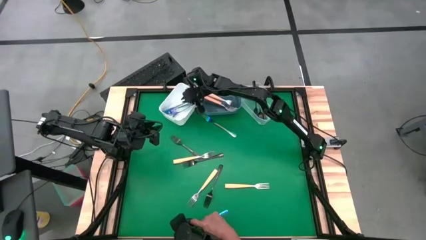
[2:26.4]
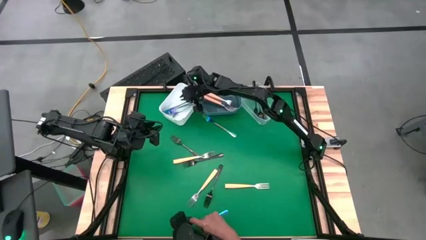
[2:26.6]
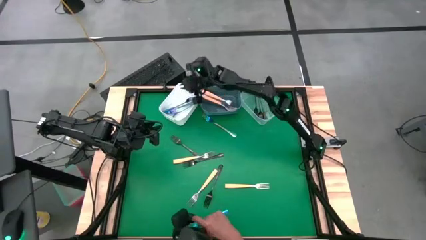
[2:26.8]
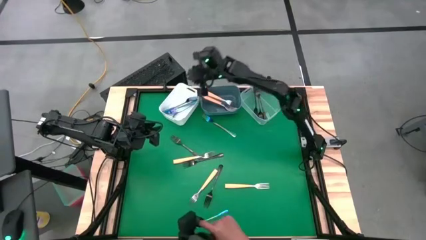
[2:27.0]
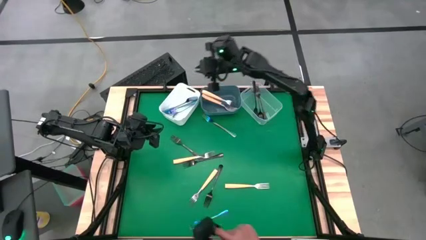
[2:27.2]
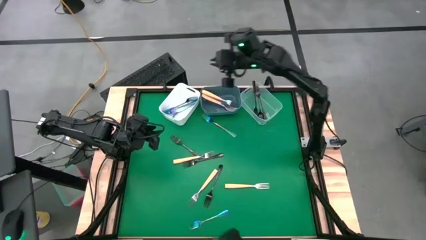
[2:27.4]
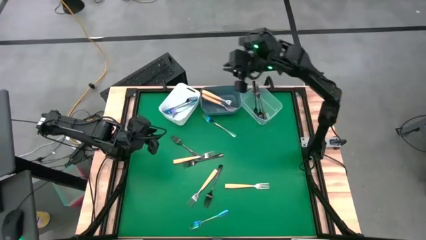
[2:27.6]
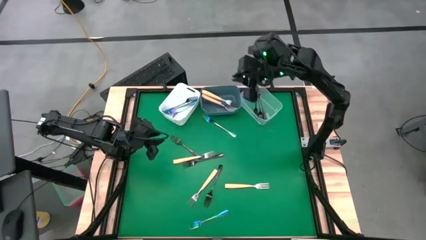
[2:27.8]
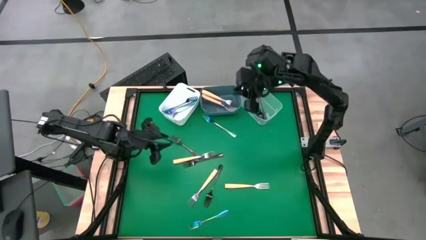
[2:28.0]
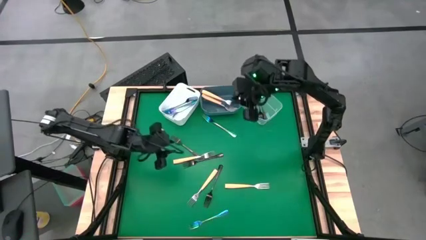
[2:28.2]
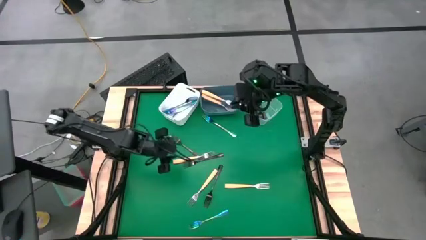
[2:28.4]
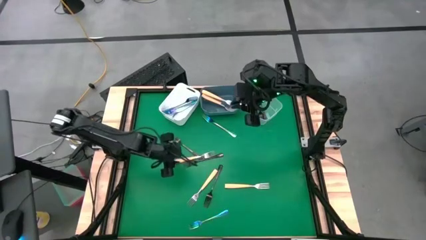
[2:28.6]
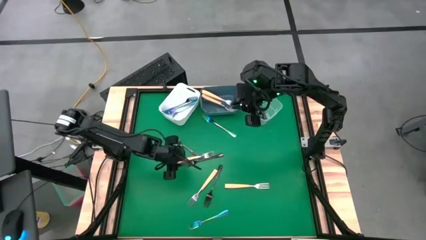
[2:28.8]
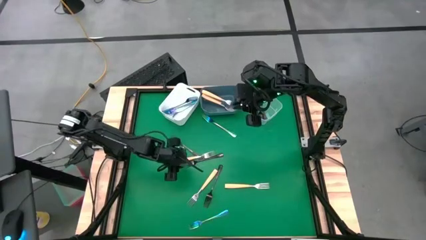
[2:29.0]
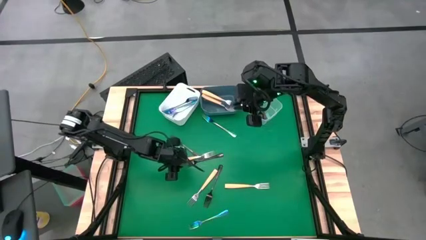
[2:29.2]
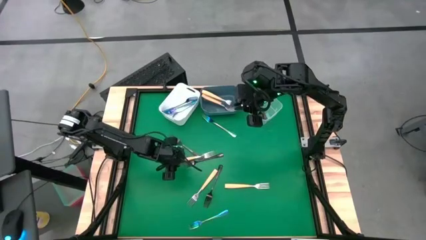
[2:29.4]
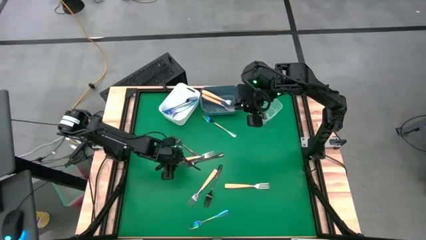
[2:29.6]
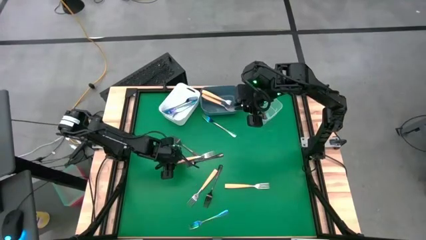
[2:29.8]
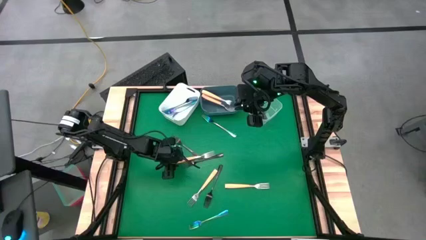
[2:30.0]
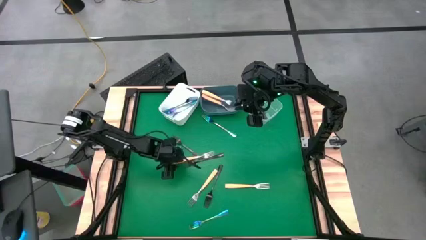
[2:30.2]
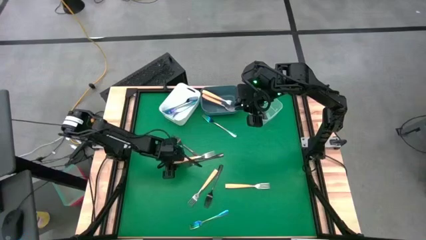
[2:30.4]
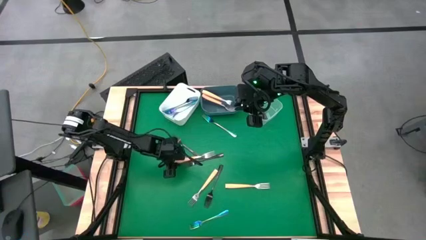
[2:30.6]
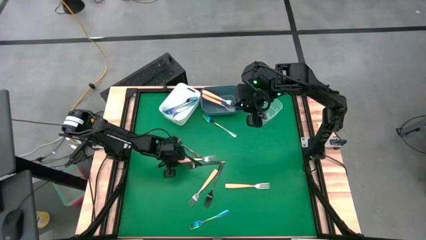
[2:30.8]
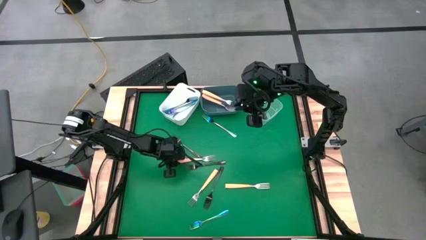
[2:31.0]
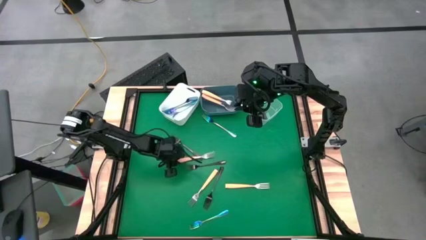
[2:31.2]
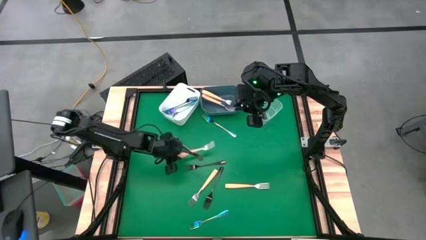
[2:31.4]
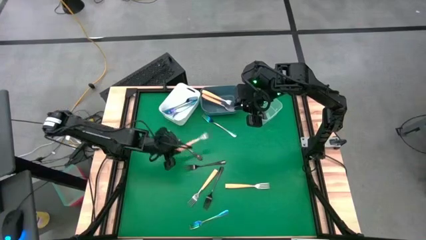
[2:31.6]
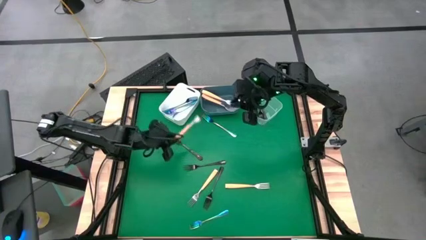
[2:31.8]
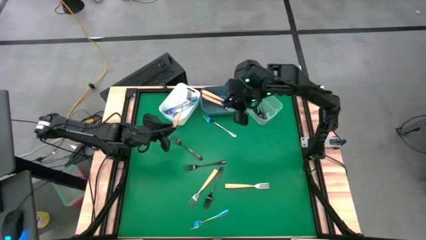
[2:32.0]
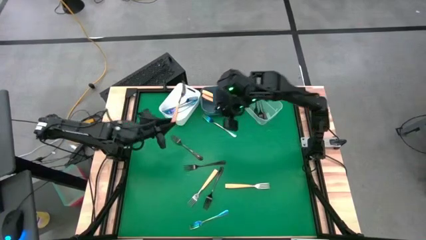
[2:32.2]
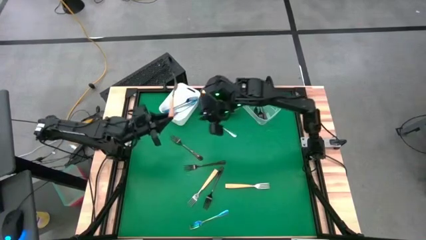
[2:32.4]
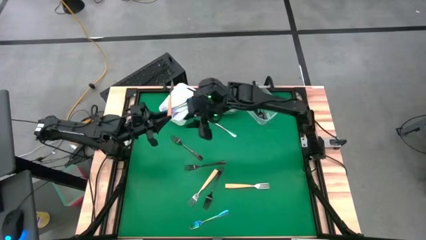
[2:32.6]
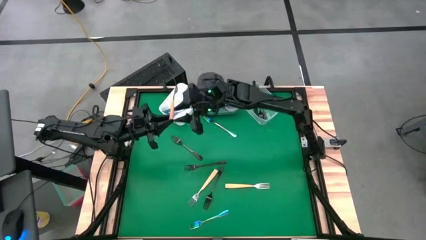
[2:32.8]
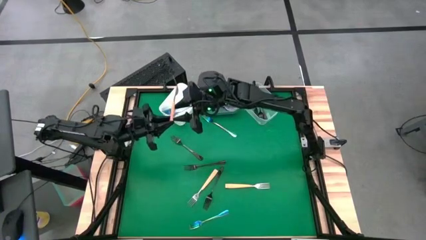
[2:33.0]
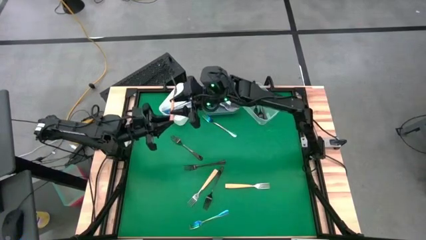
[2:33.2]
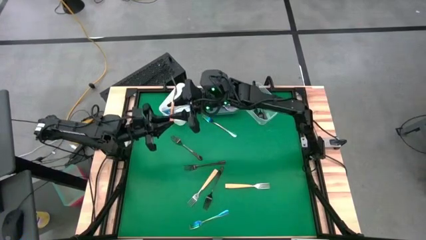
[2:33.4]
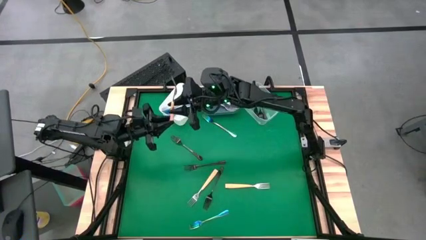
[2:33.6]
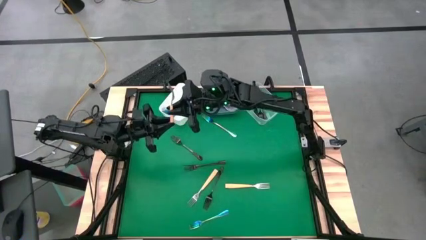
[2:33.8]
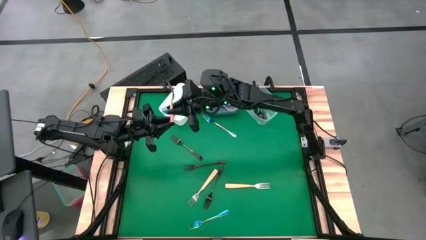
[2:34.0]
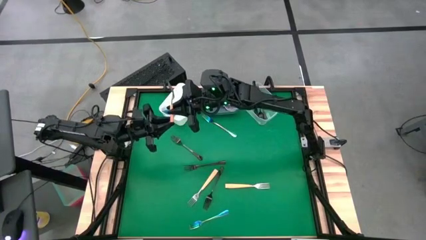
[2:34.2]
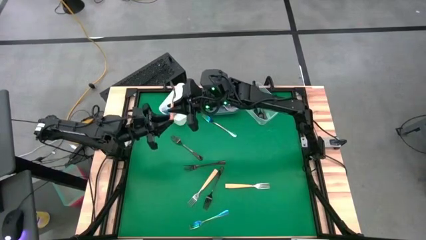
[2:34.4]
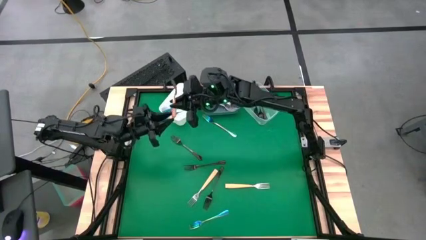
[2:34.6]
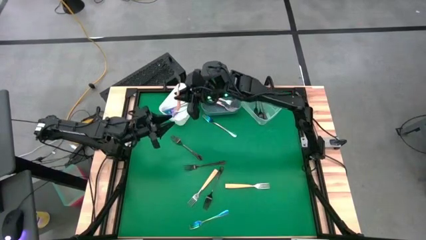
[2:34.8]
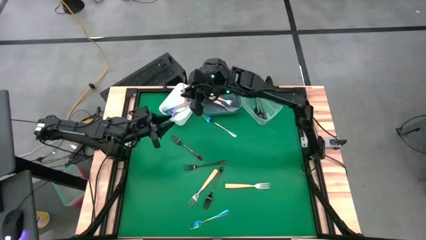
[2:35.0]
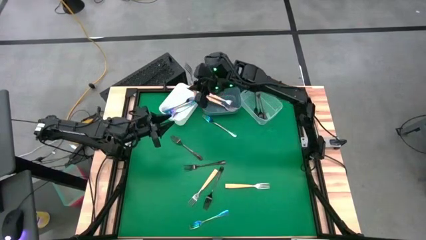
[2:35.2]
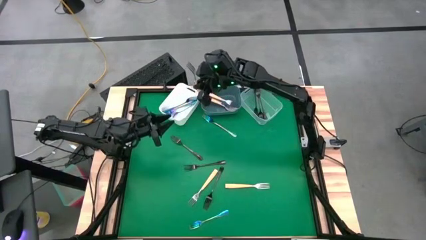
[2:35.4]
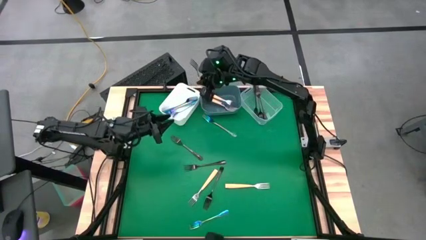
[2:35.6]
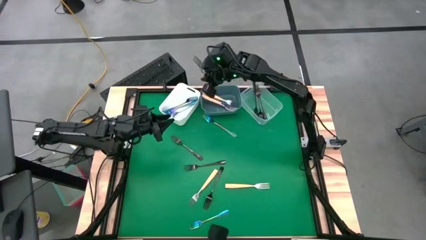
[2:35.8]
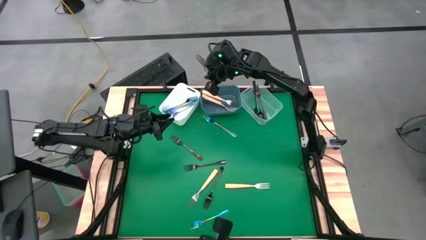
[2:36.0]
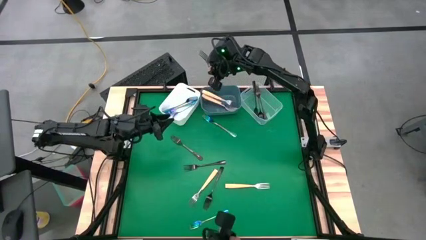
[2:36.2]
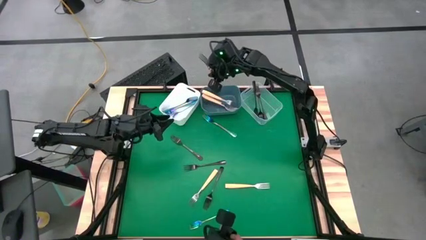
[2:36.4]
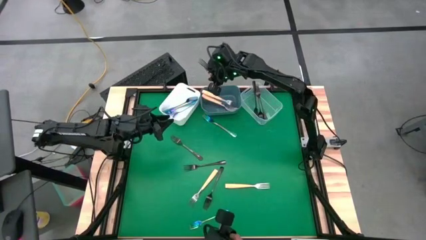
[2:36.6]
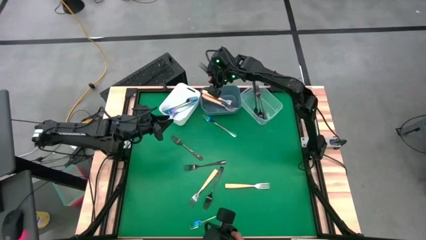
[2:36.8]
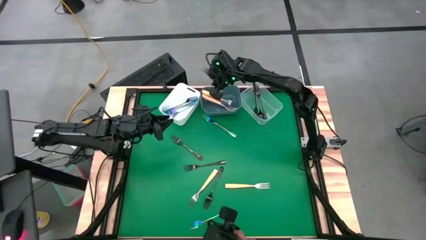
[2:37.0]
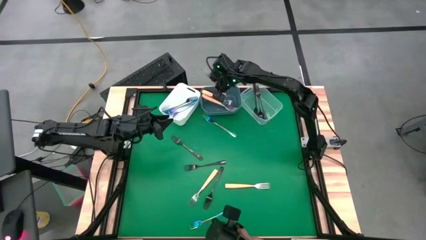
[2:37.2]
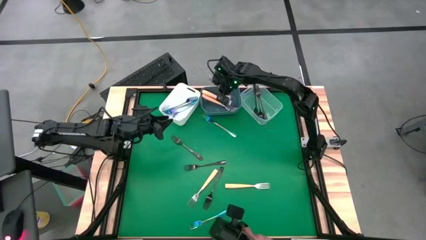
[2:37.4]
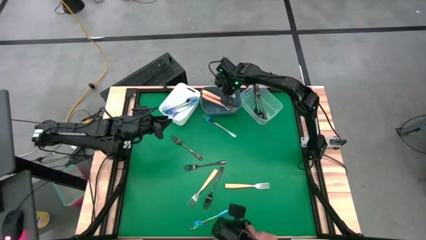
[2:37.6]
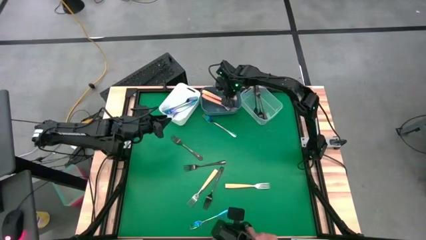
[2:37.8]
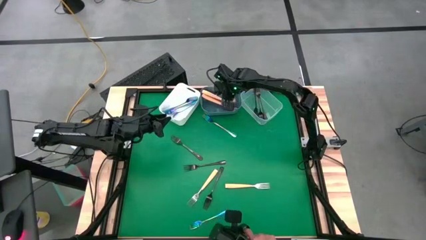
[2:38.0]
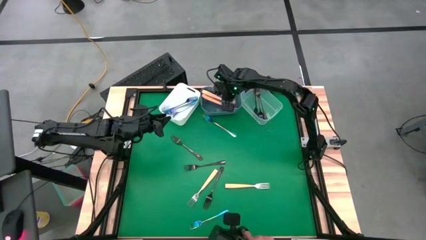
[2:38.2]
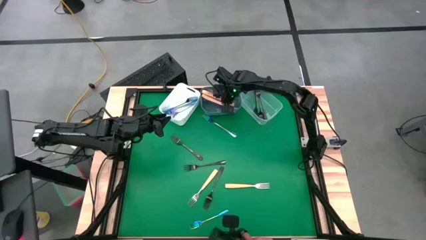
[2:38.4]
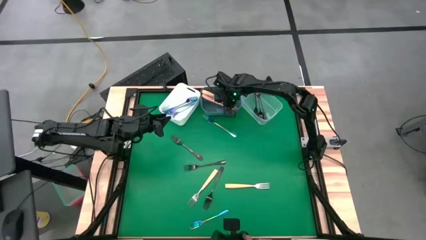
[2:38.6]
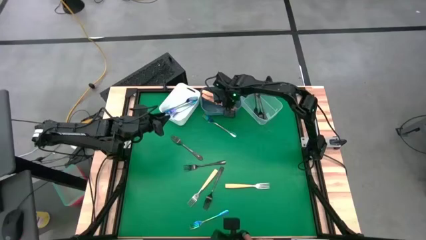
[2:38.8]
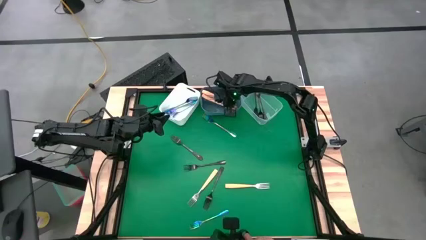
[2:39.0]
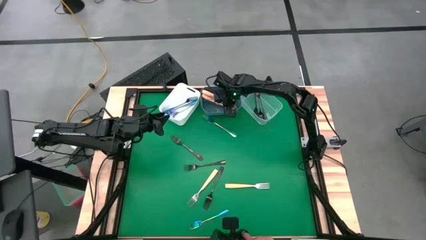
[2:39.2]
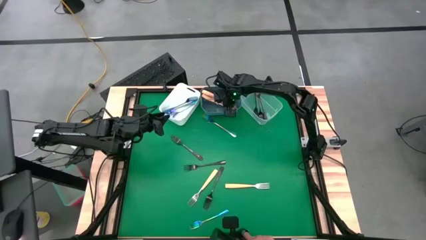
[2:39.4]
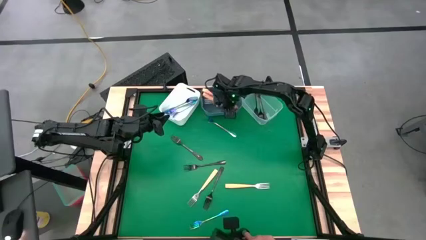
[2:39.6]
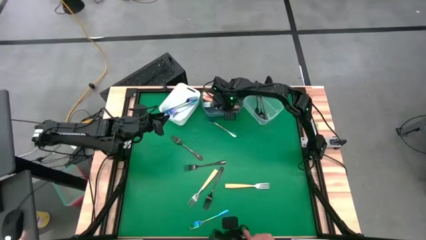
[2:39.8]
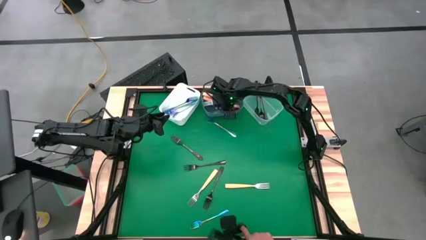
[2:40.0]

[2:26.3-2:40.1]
Task: Sort silverware by color (type)
Put the yellow fork into the blue bin

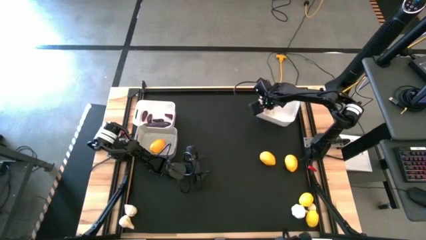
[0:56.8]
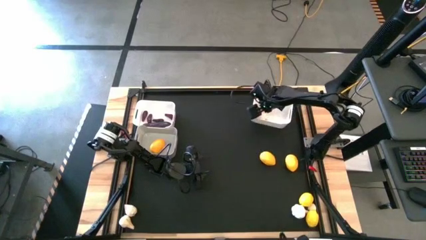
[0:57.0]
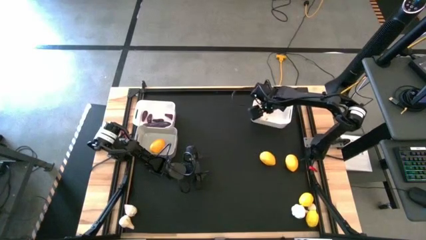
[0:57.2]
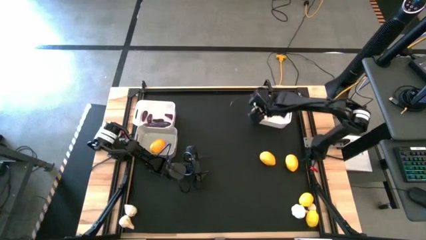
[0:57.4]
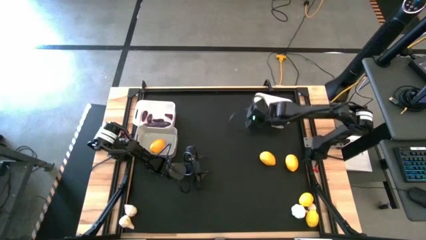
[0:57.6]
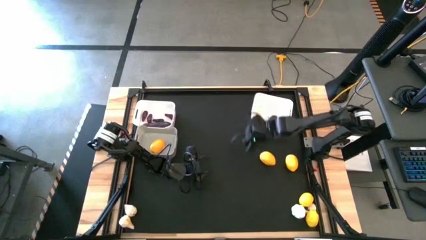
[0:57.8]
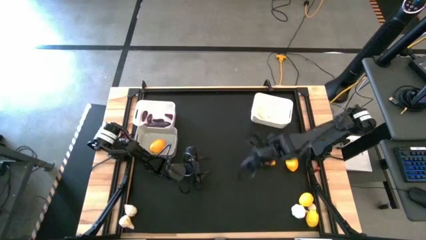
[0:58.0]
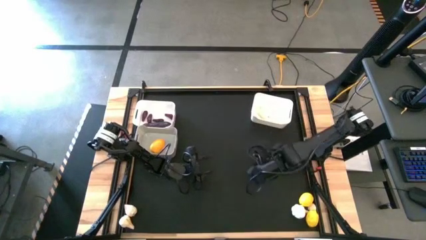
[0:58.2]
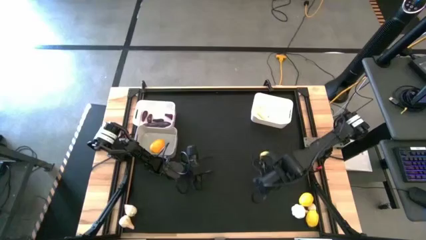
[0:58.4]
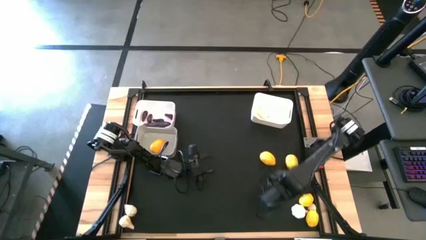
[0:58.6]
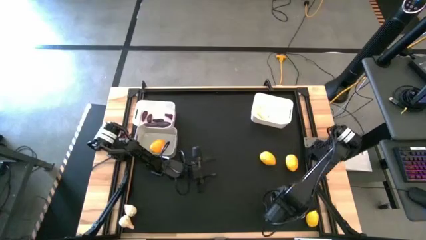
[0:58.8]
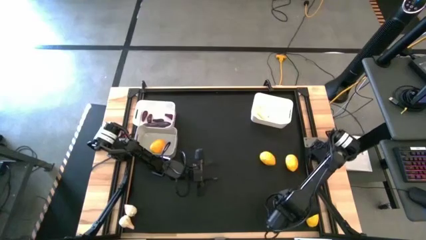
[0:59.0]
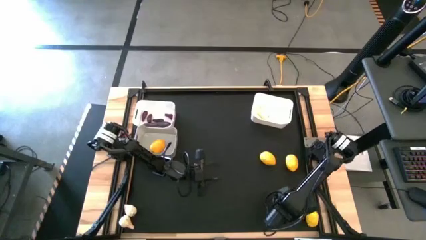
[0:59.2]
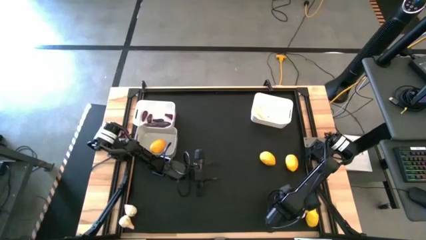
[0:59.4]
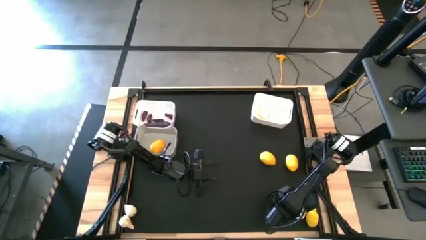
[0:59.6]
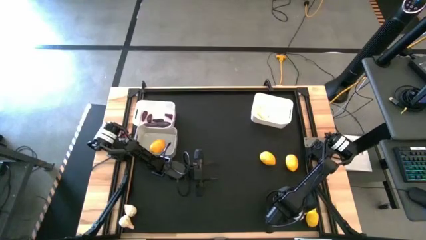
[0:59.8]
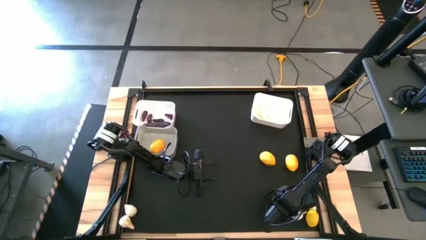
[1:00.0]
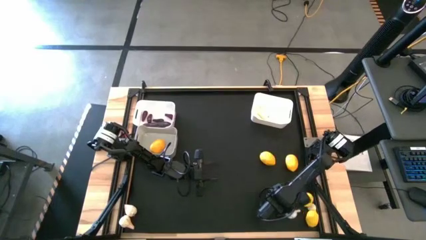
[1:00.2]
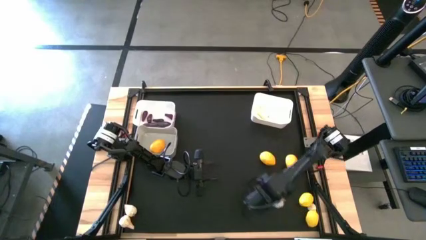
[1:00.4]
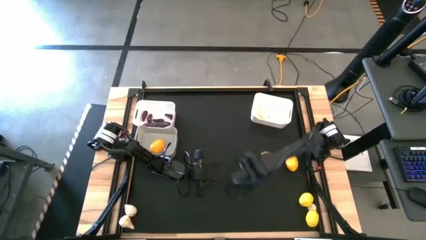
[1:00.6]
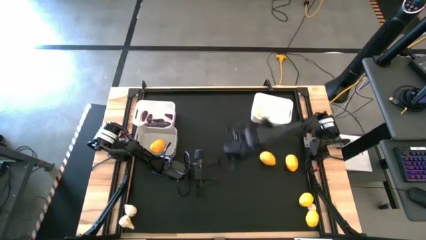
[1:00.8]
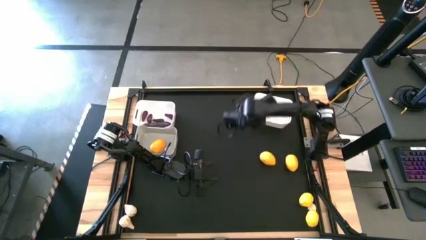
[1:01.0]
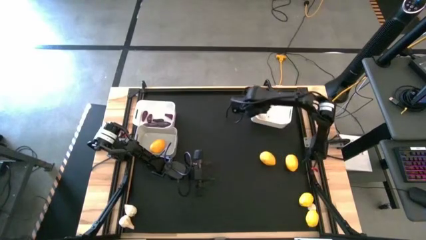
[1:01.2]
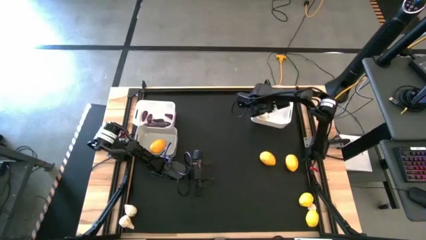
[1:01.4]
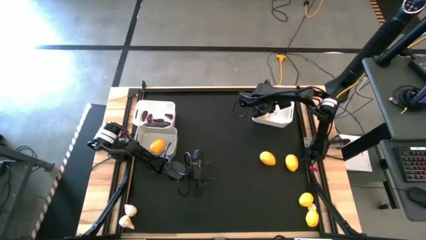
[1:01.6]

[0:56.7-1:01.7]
Task: Sort produce into baskets
Put the garlic into the right white bin
